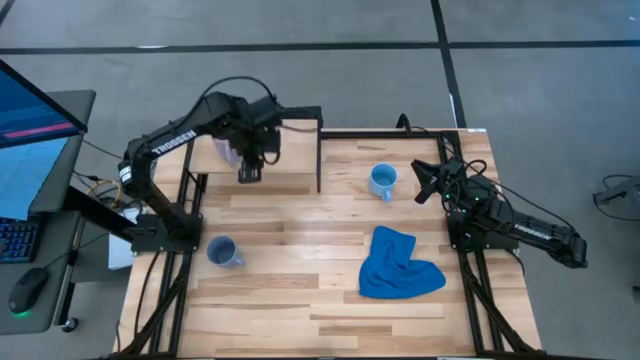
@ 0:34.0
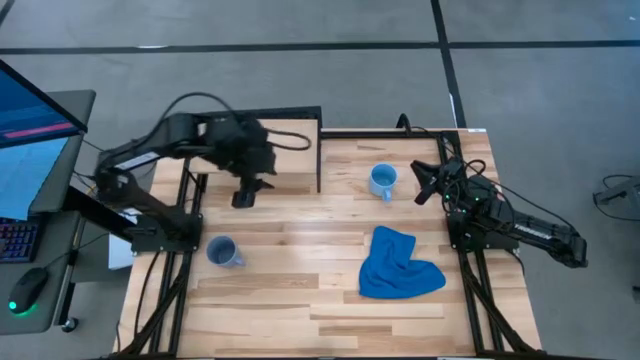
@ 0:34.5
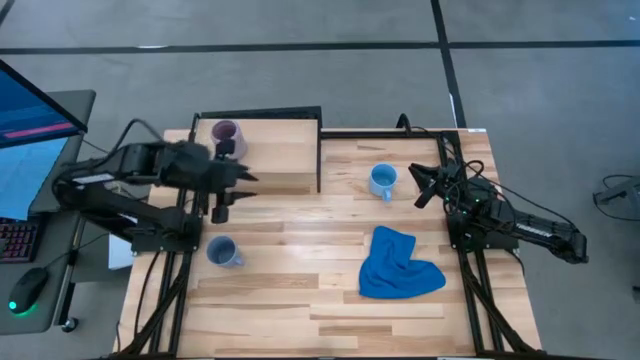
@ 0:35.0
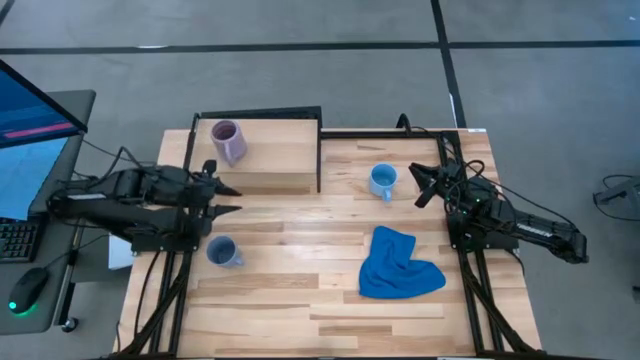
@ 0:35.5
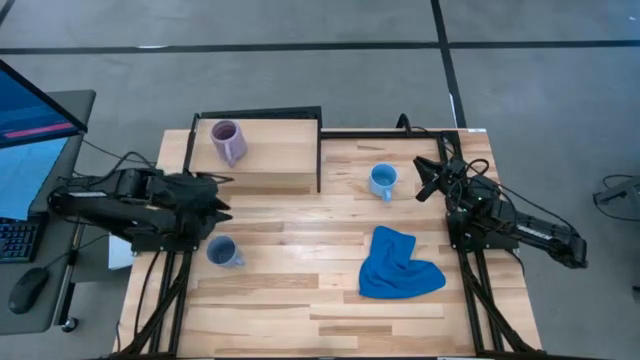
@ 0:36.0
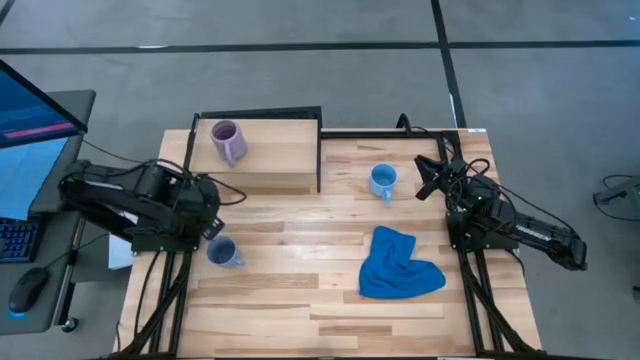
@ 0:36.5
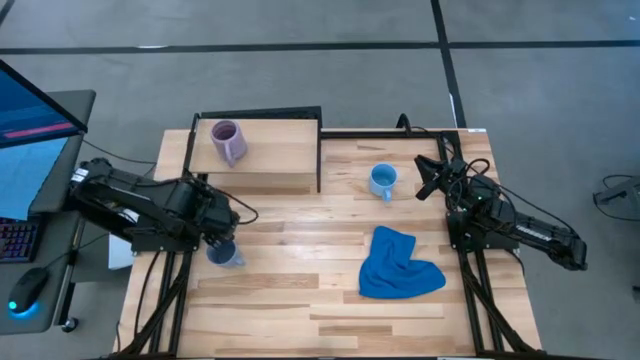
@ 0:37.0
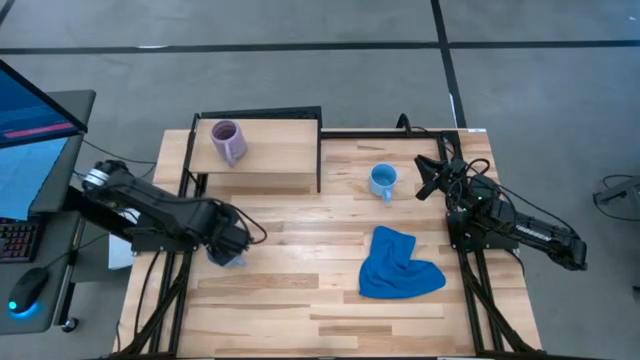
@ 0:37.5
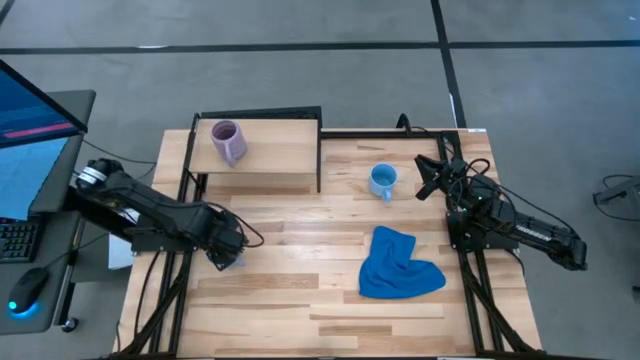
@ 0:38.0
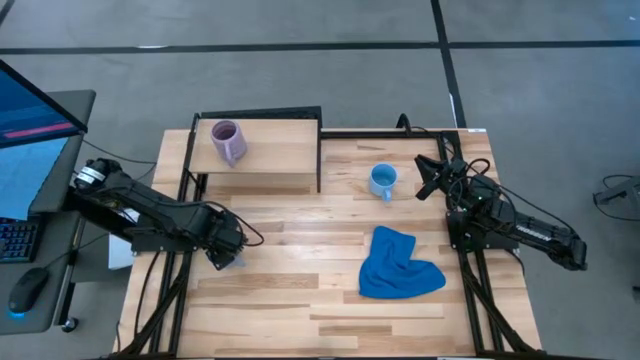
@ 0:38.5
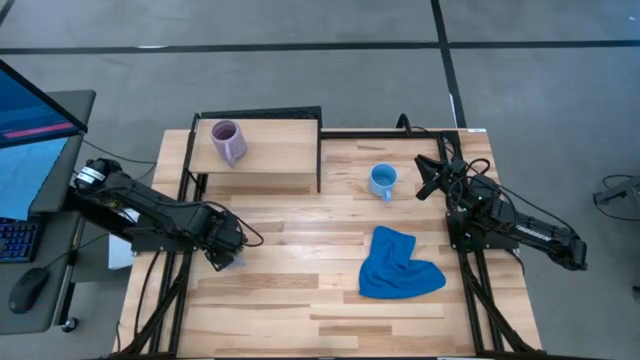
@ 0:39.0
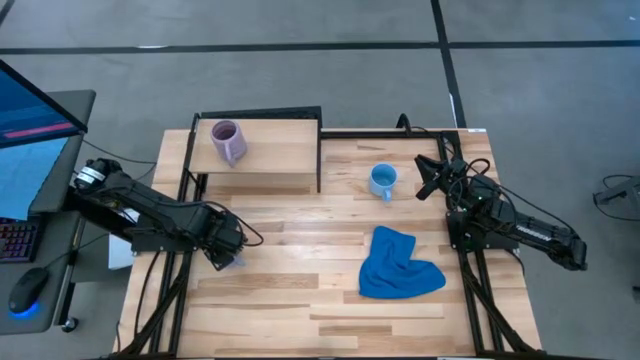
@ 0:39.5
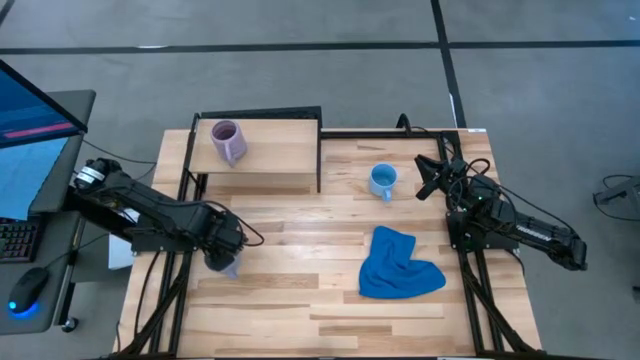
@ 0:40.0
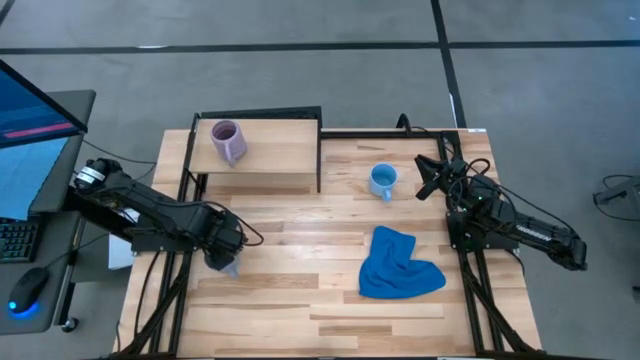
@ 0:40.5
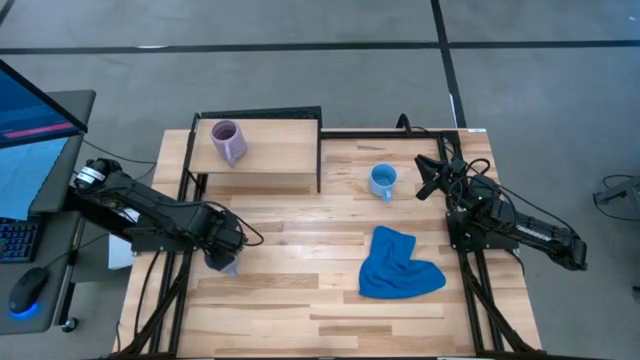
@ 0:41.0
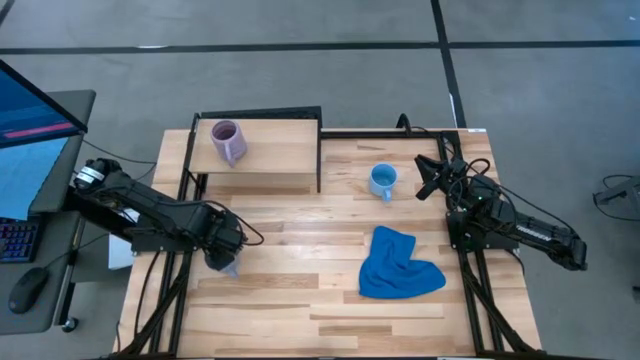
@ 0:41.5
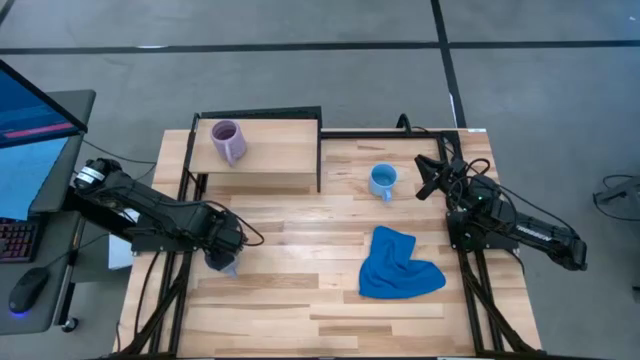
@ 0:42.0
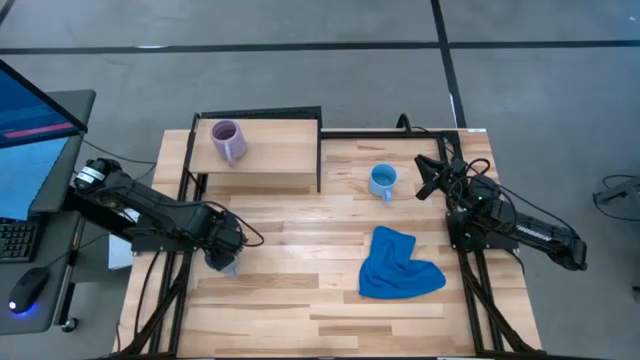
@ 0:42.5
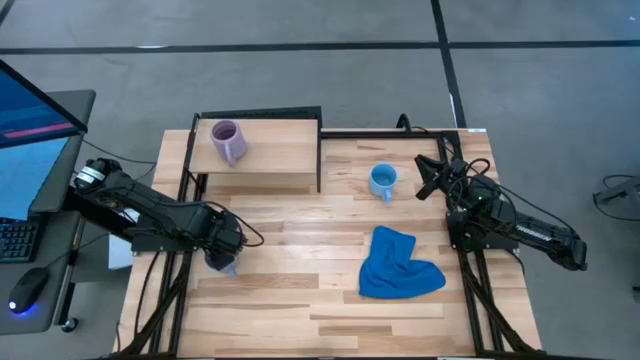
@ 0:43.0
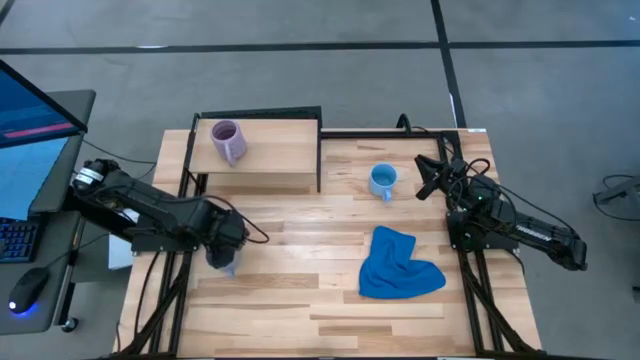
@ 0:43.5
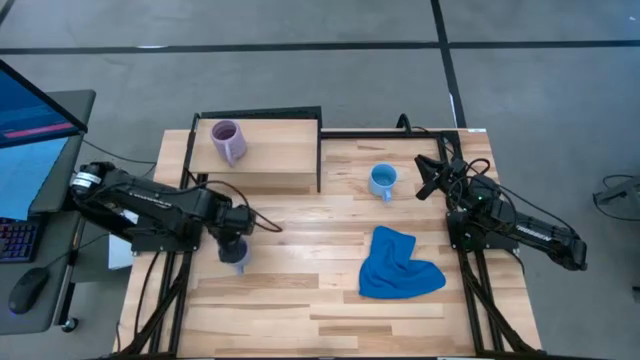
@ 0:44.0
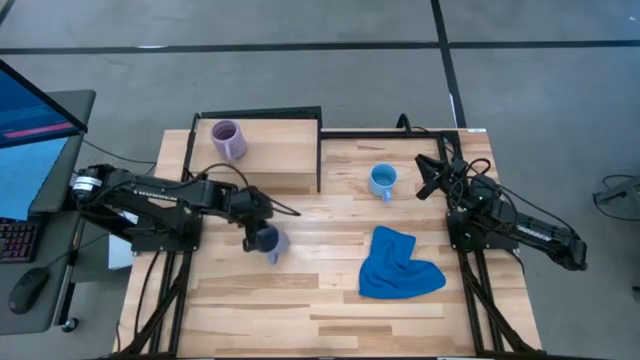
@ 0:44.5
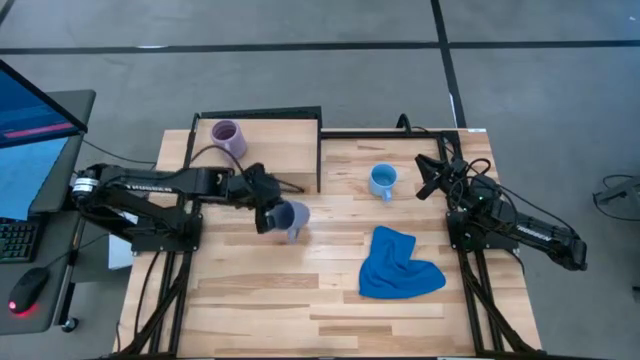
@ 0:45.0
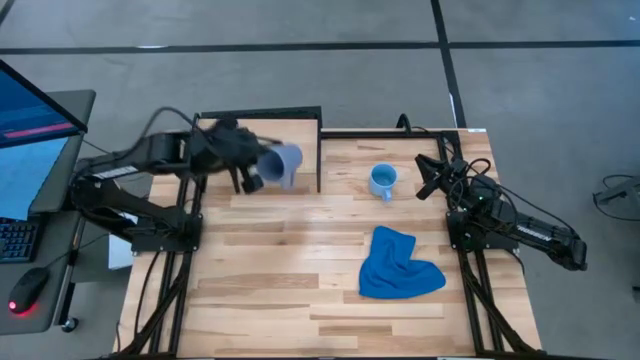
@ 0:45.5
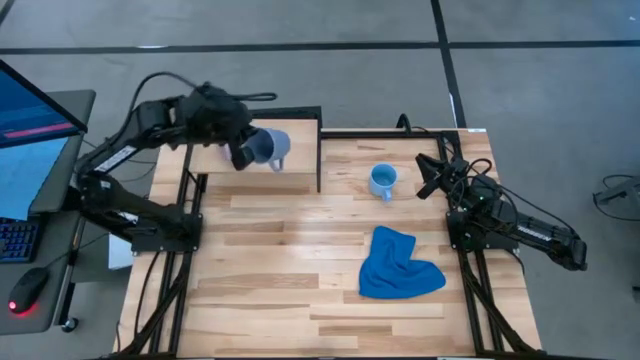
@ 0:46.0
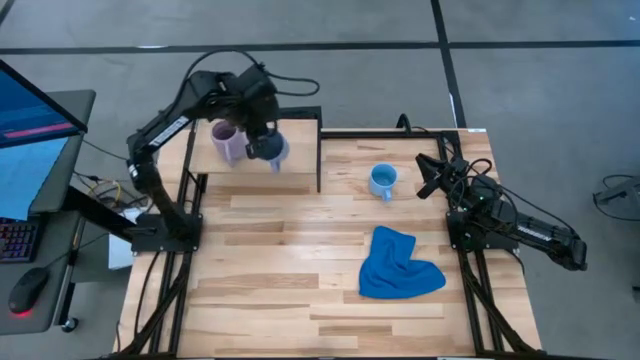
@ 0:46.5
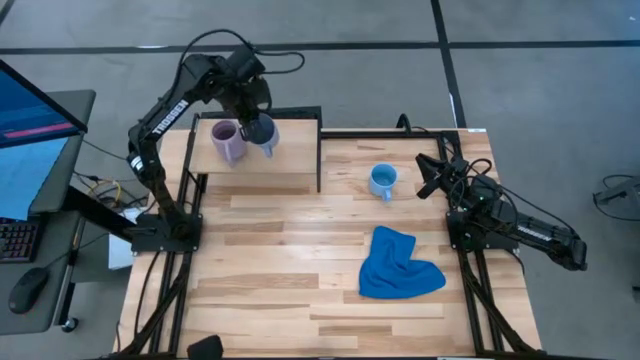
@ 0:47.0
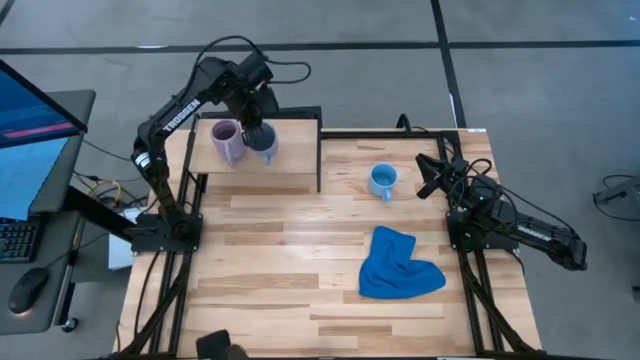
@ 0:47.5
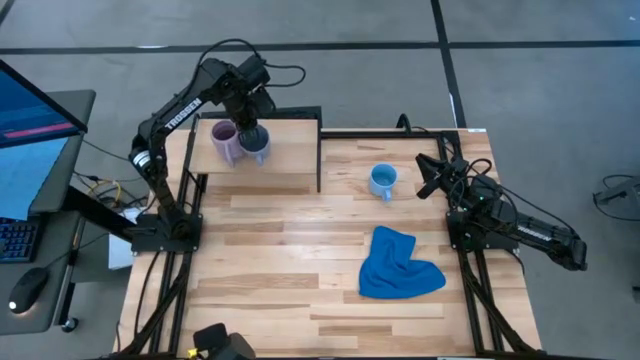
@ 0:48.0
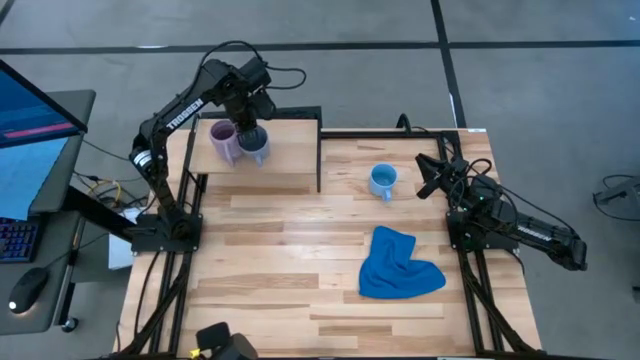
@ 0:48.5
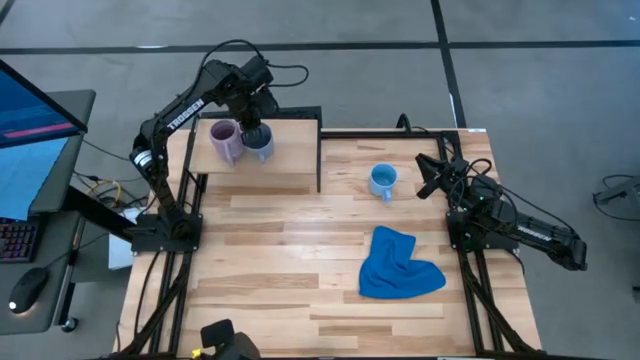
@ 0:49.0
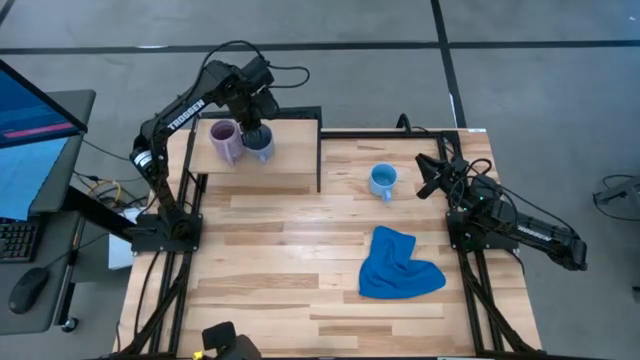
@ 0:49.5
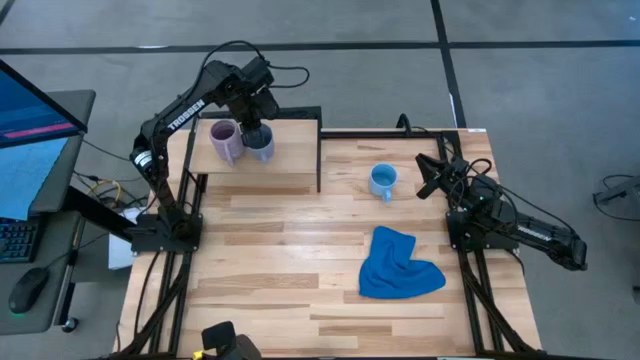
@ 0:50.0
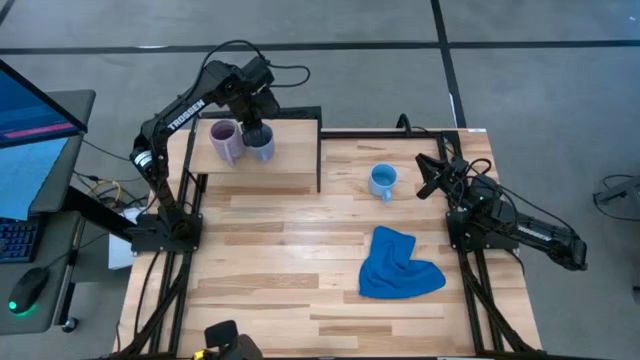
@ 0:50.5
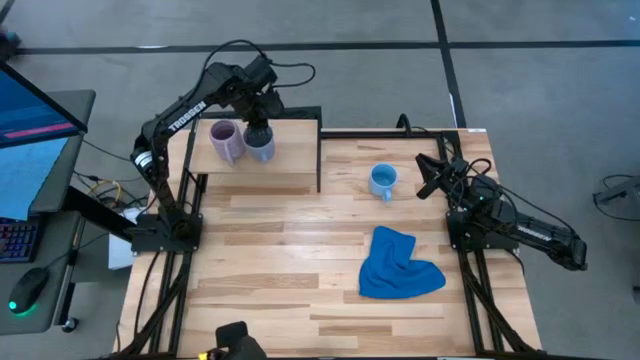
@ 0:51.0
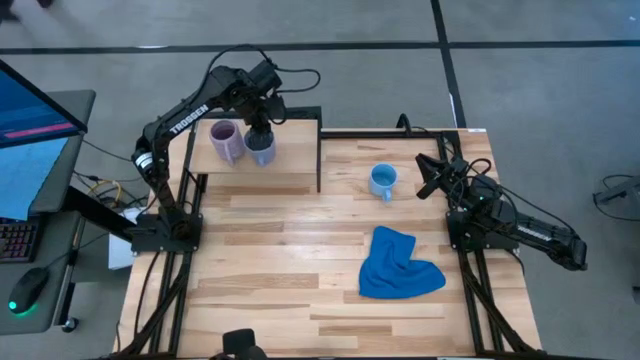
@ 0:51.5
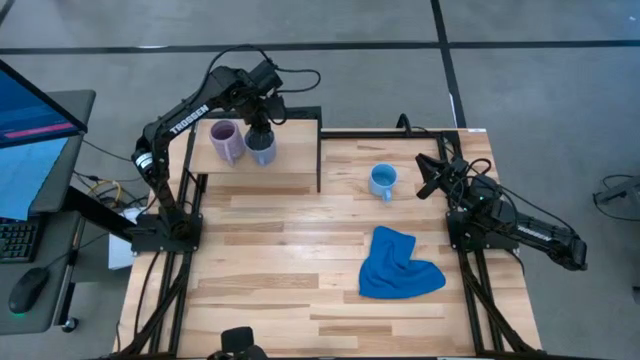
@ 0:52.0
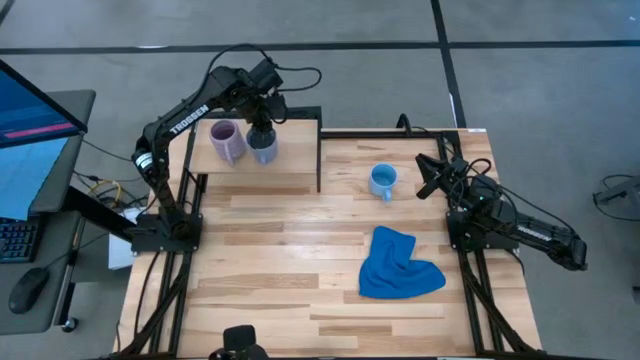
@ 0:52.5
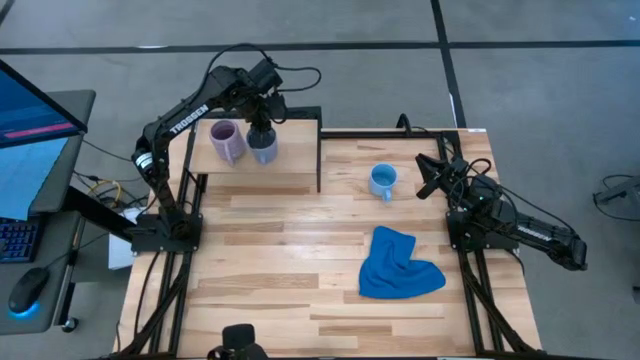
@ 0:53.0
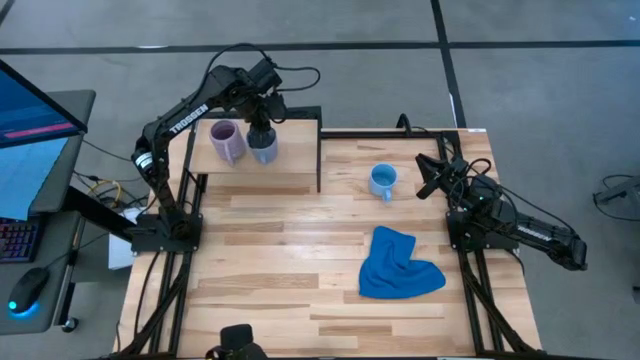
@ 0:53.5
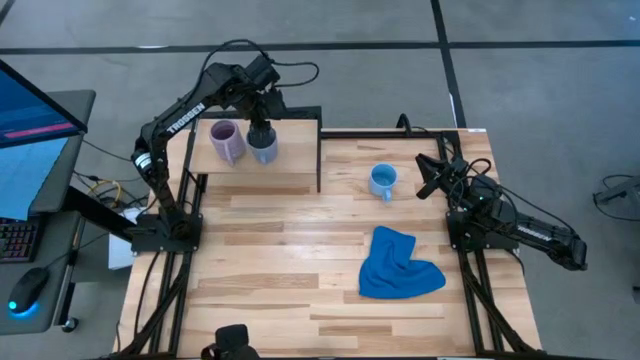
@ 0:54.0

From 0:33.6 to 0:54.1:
Task: Stack small to large cups/mugs on shelf
Put the violet cup on the shelf
